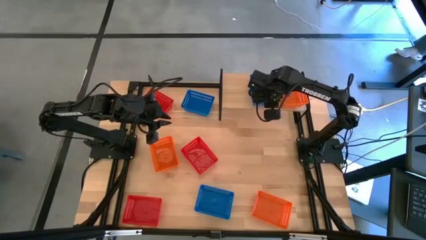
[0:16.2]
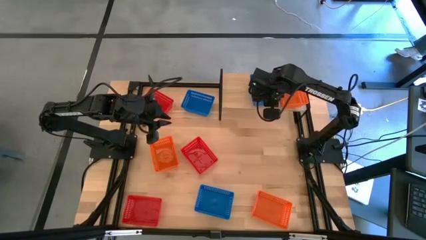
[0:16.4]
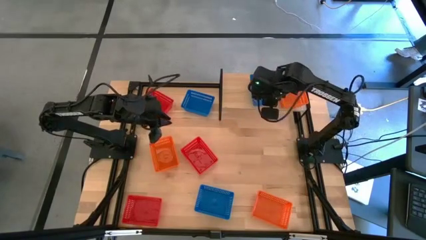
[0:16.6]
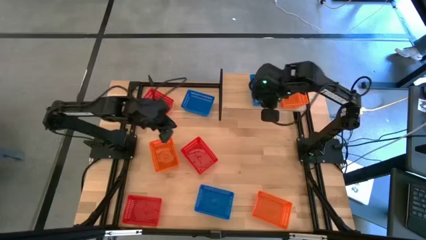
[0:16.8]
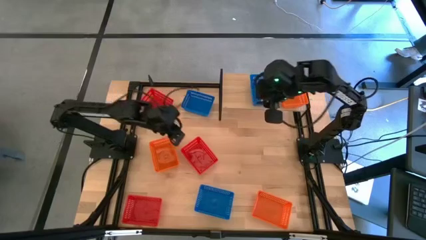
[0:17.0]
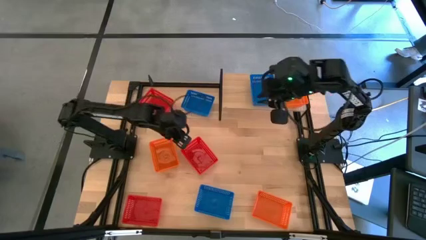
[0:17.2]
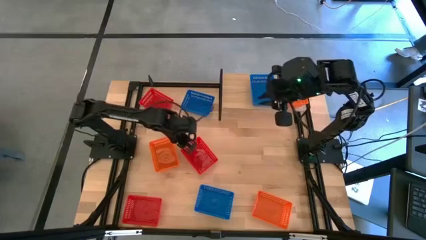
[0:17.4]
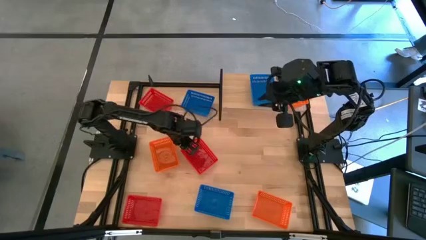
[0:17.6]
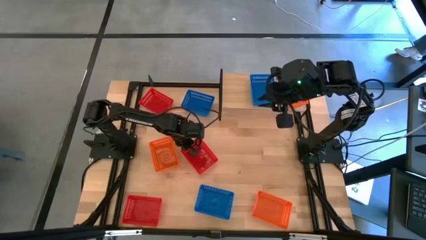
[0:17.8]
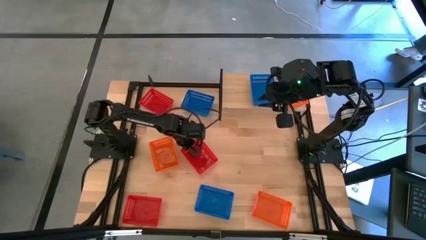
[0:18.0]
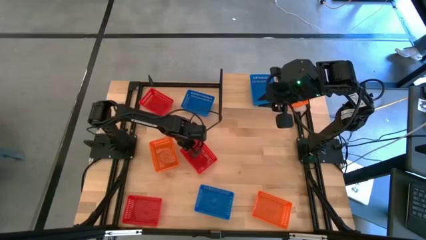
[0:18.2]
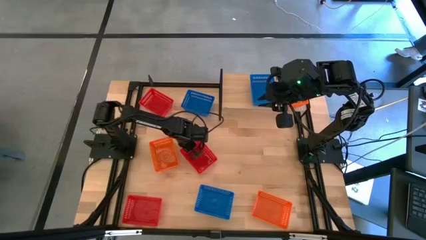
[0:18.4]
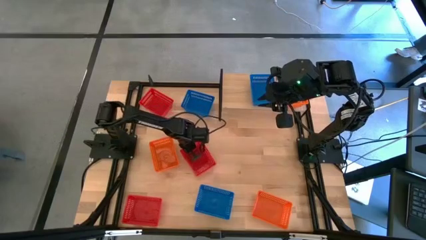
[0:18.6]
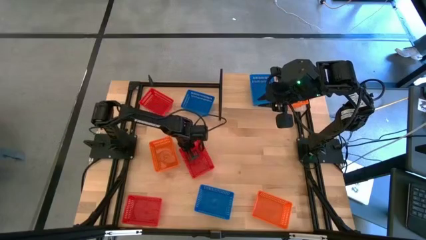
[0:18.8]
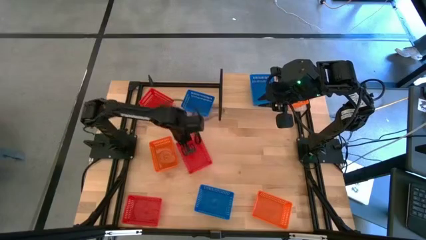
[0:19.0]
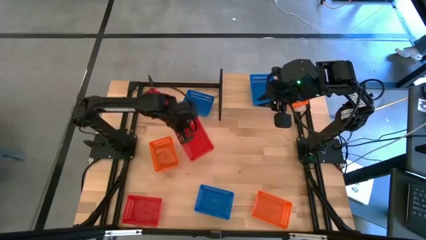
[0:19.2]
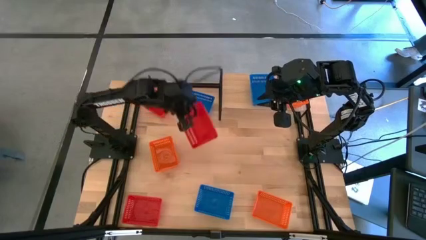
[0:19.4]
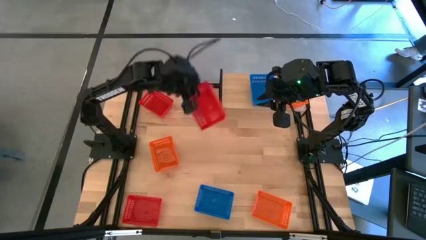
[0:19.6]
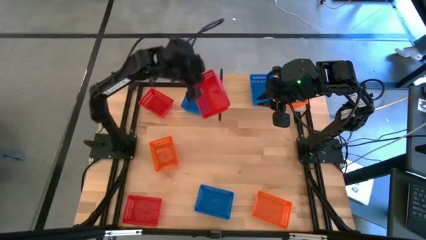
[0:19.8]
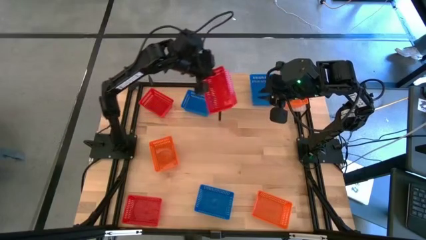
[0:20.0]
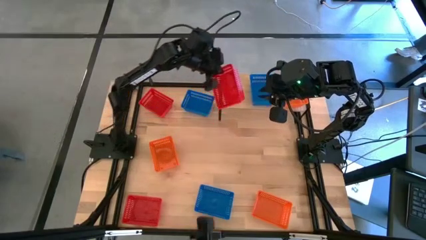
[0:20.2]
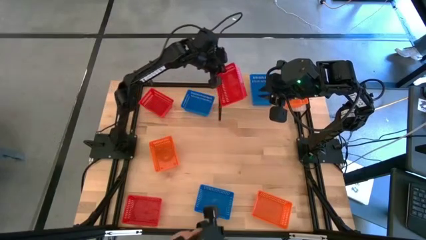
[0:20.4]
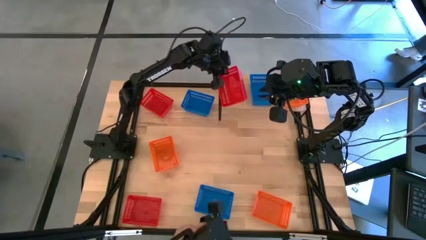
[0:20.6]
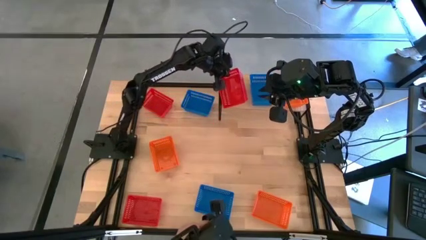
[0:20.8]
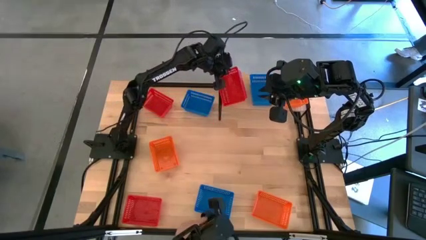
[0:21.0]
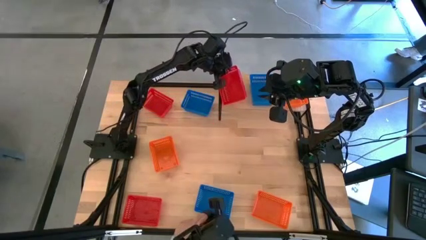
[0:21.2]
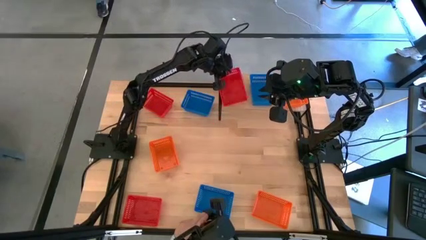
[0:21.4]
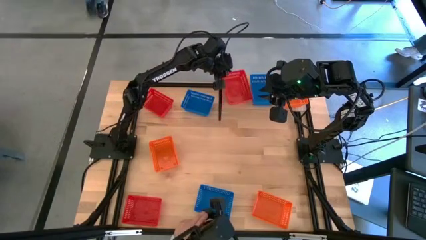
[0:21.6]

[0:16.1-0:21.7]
Task: Stack baskets on shelf by color
Put the middle red bin on the shelf

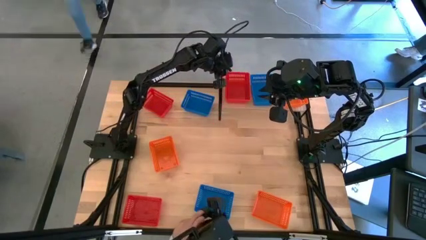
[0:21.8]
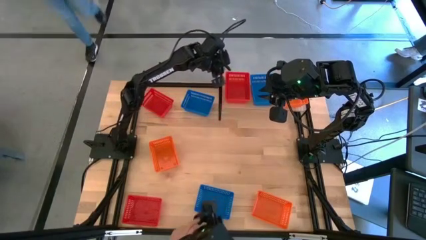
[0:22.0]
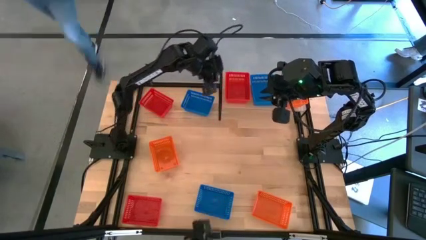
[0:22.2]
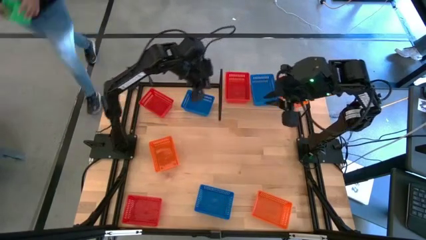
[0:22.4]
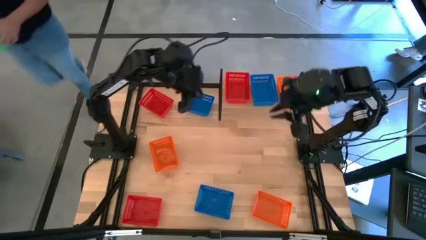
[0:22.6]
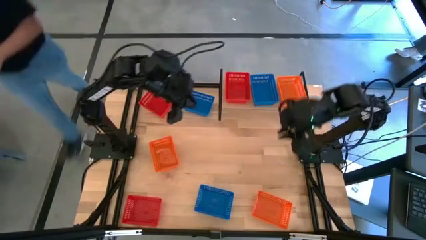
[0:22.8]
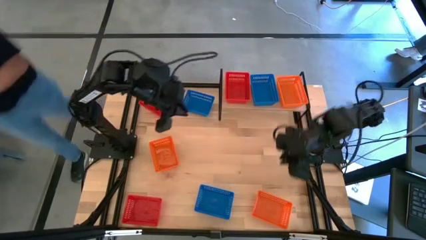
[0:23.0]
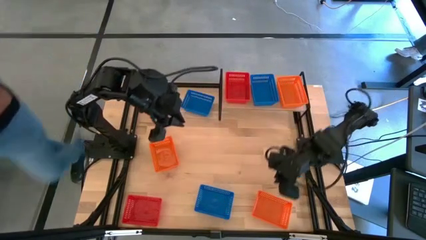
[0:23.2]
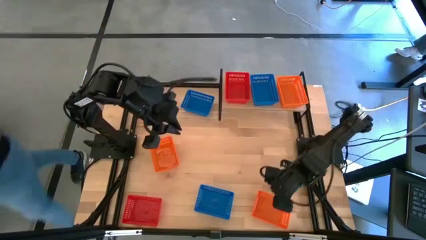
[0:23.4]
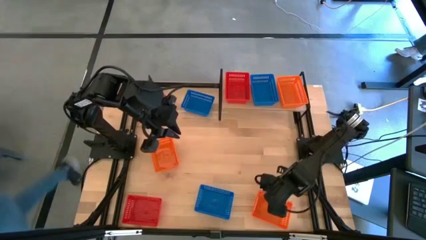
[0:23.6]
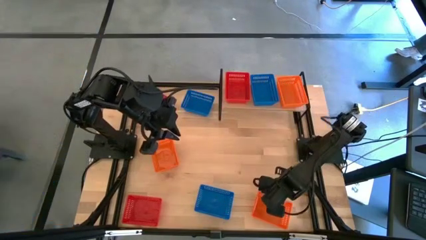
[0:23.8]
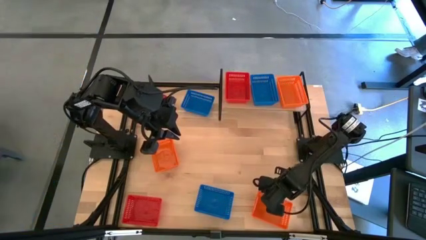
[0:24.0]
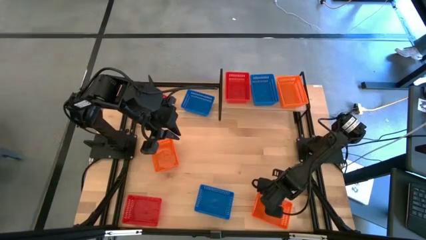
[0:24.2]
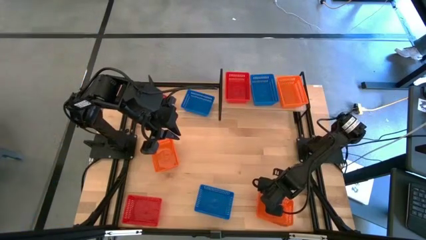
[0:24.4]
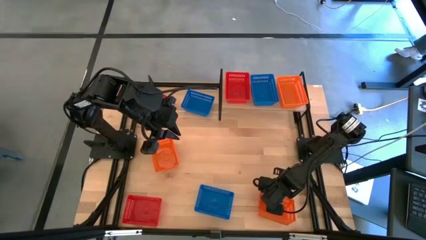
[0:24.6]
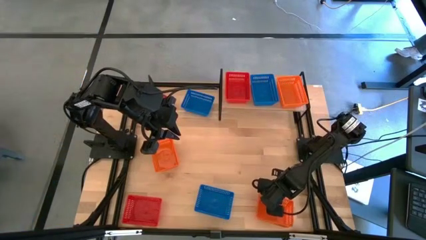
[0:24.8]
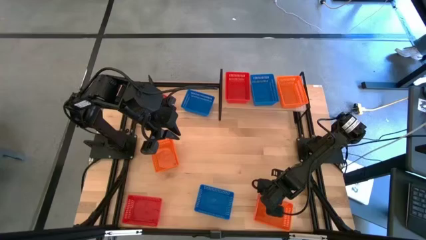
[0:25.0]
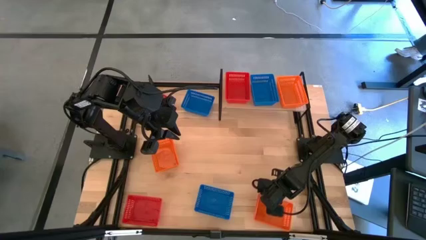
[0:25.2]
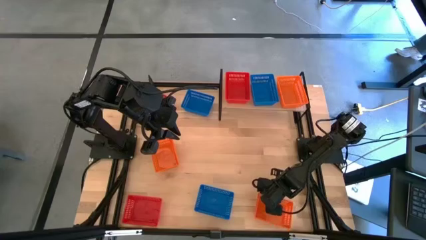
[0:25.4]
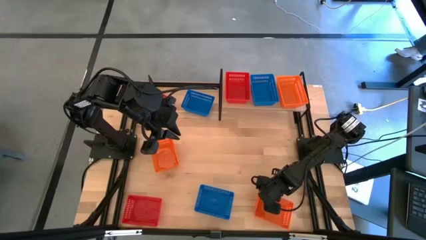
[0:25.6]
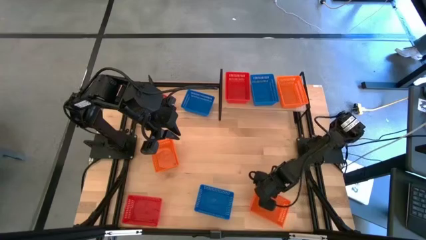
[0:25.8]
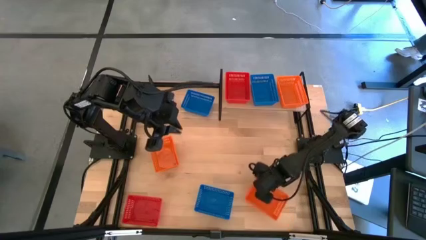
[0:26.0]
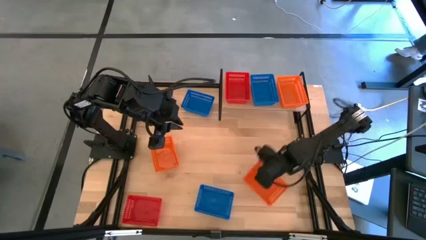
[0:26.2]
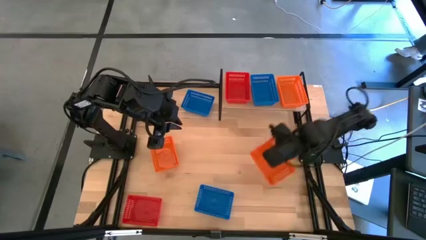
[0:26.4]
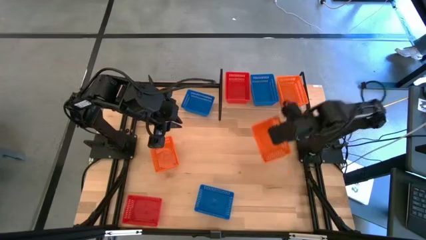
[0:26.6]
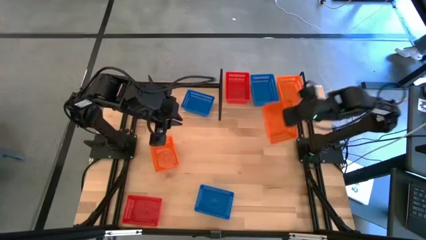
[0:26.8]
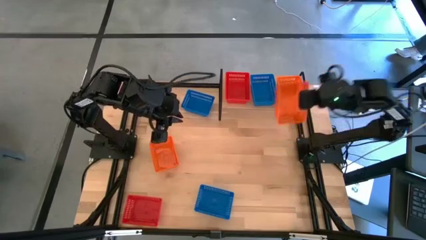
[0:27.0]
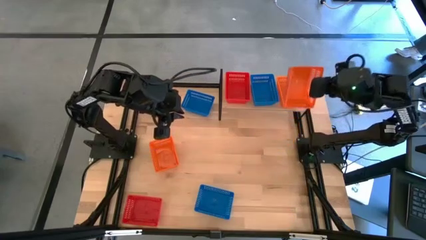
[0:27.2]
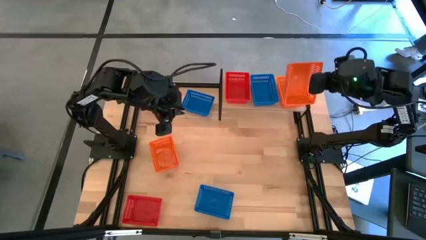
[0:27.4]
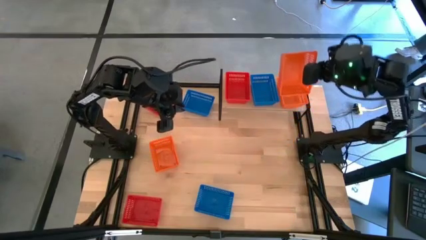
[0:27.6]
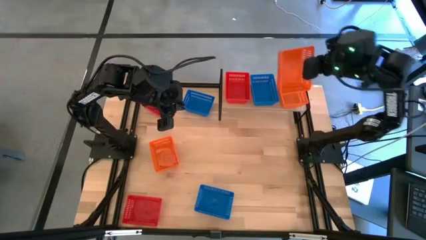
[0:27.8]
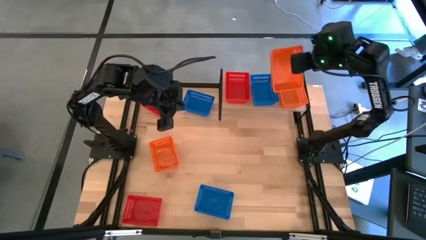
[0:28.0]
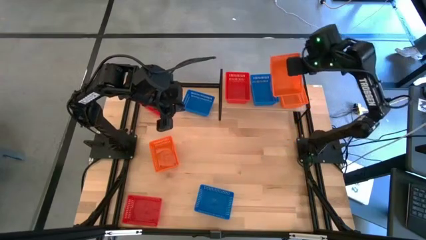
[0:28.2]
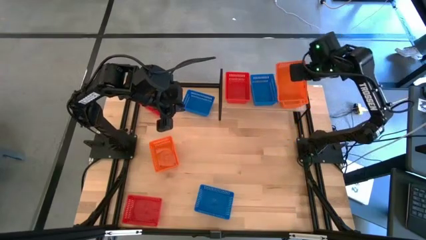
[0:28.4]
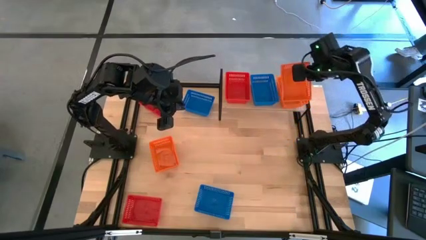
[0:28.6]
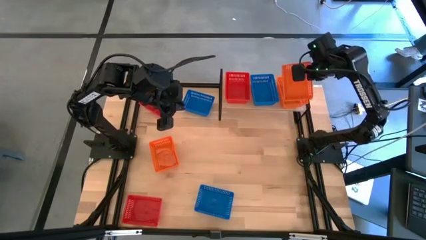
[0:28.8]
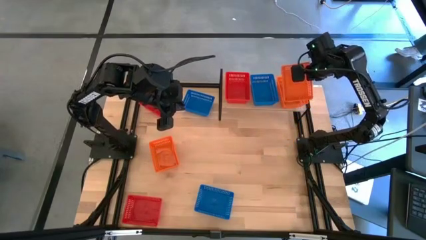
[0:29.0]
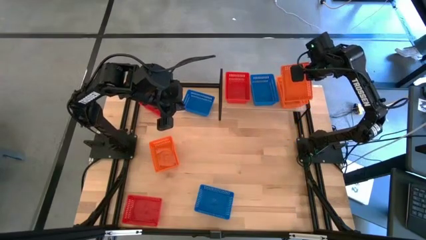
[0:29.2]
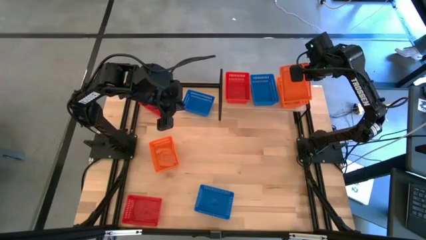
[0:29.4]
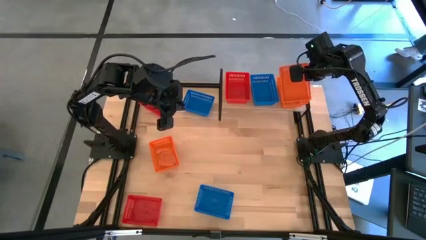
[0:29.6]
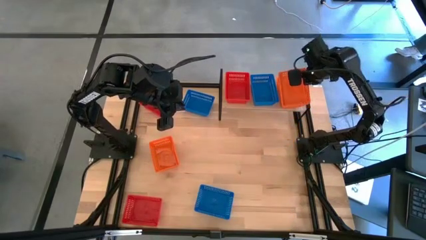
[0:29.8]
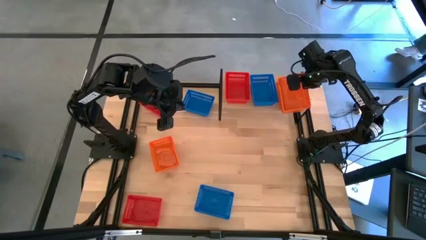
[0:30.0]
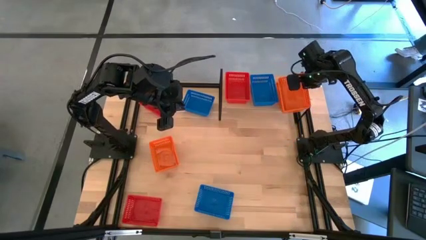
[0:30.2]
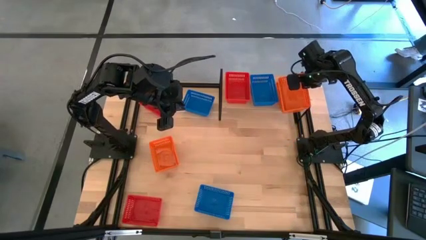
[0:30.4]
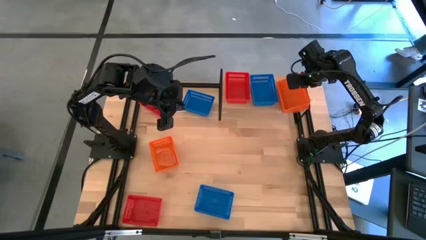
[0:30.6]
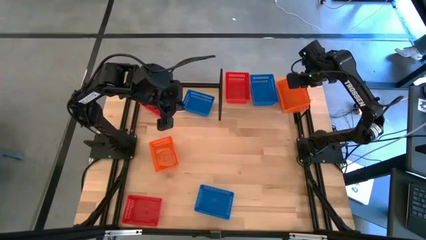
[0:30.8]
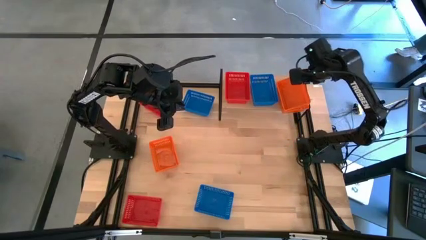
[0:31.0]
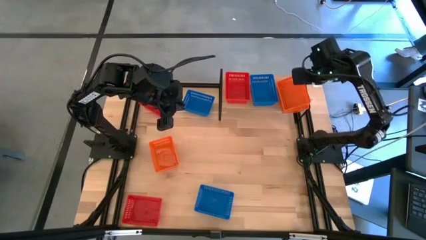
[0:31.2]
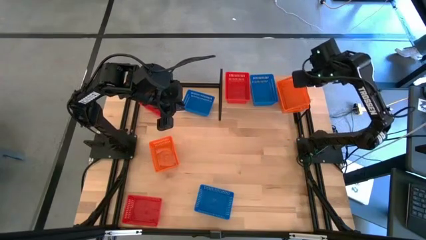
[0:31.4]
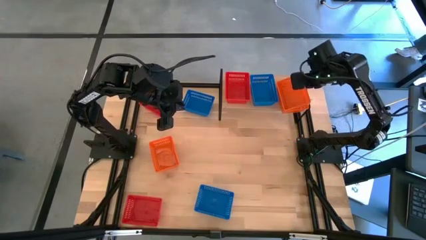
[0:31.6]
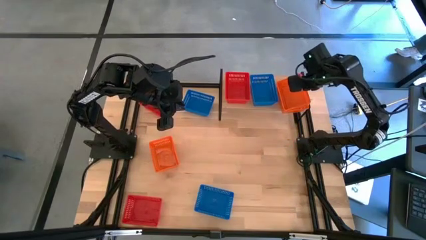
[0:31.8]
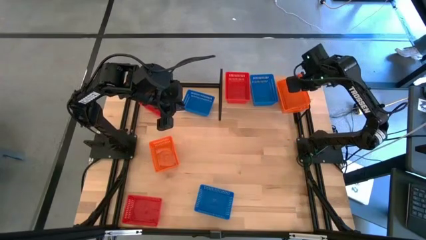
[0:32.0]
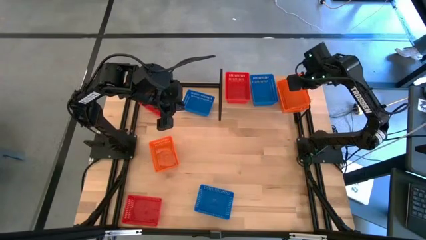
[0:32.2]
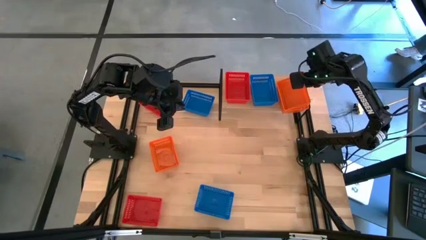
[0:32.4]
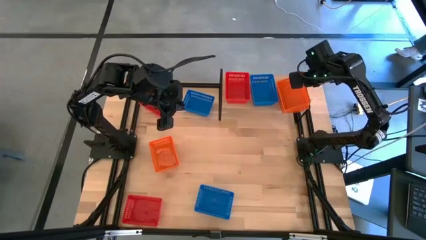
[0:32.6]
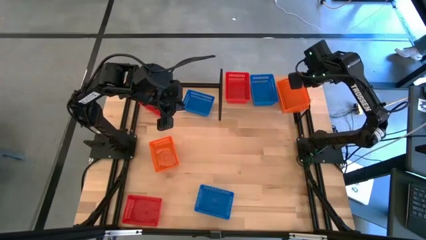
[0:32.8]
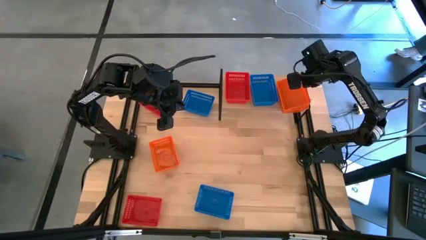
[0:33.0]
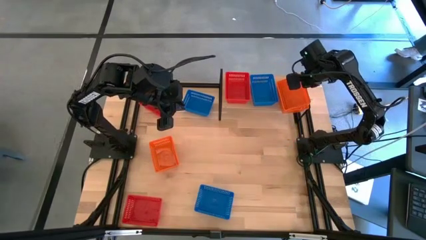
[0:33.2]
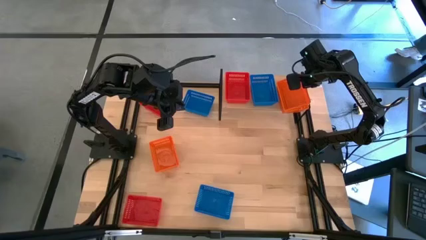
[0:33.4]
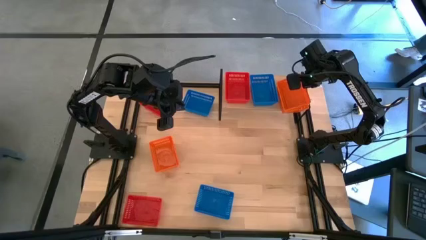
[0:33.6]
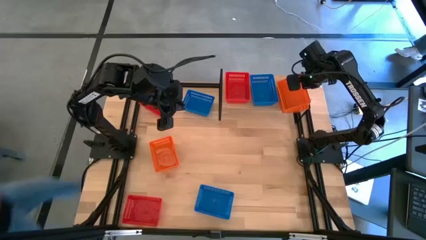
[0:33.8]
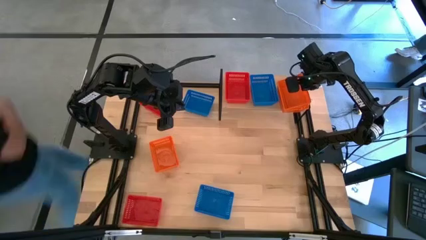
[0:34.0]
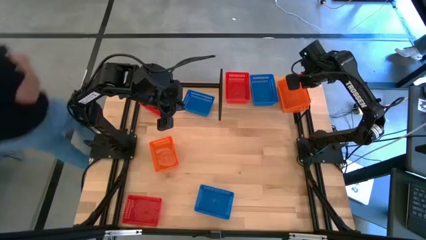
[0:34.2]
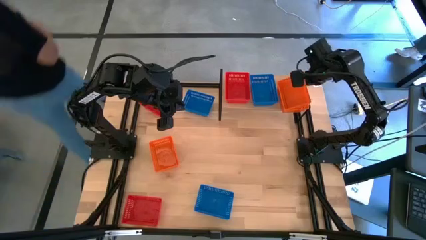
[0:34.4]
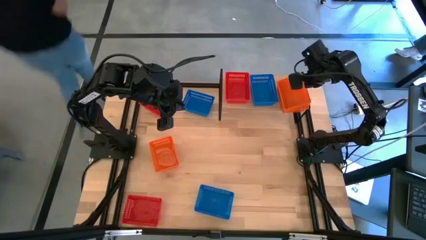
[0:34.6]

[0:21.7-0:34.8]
Stack the bottom orange bin on top of the orange bin on the shelf
